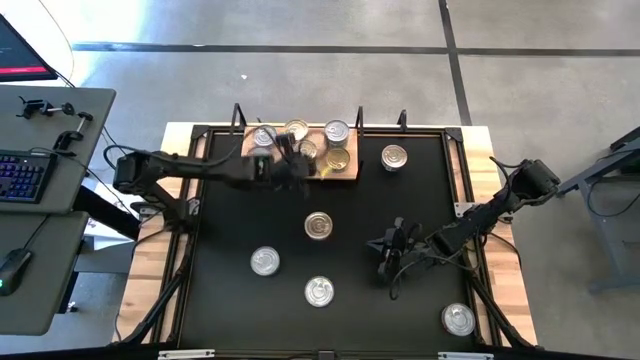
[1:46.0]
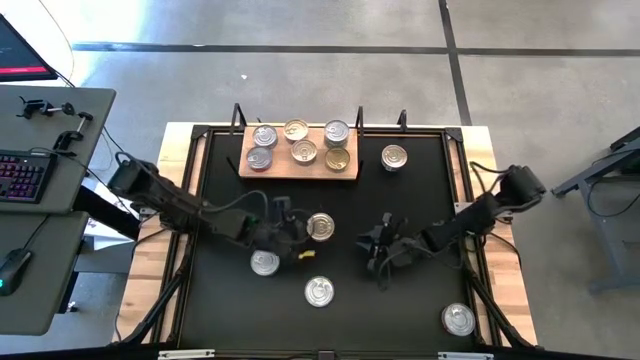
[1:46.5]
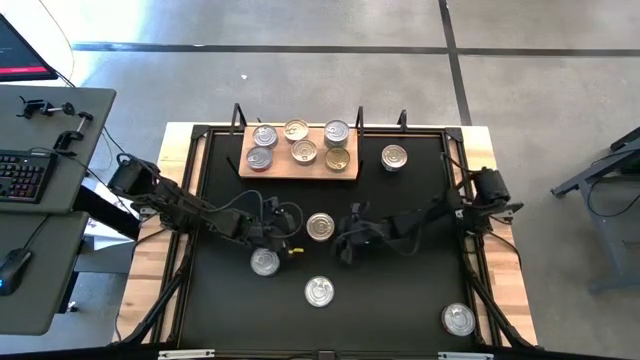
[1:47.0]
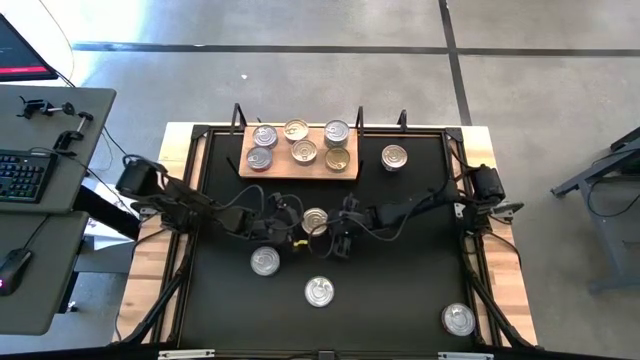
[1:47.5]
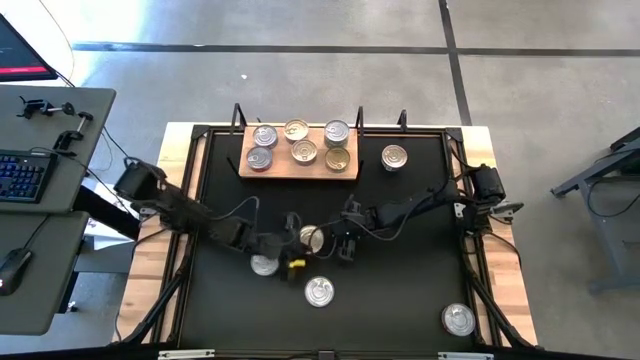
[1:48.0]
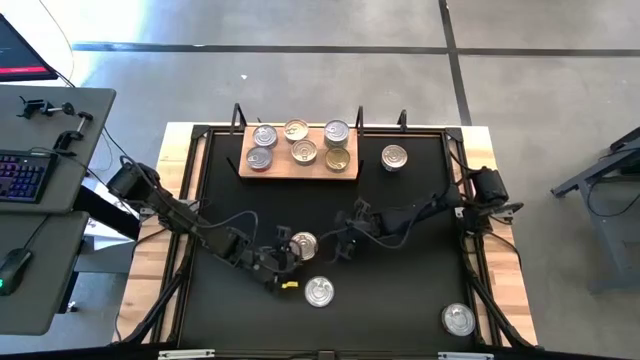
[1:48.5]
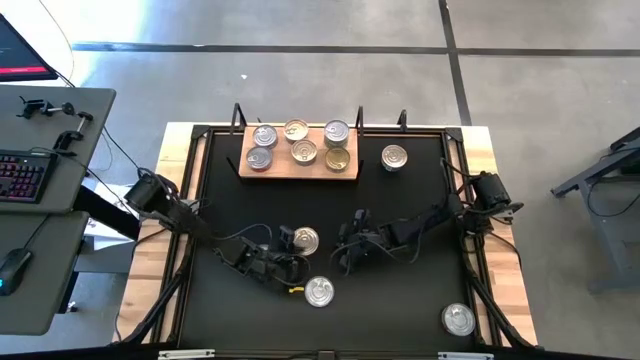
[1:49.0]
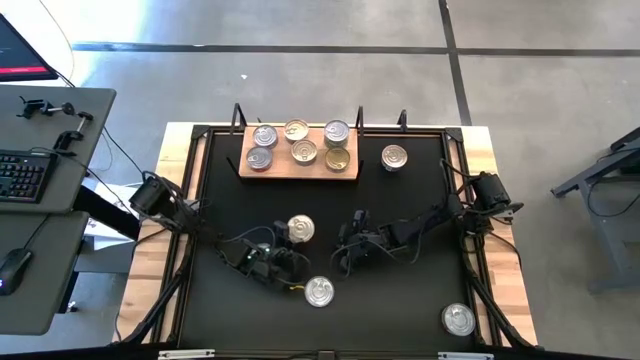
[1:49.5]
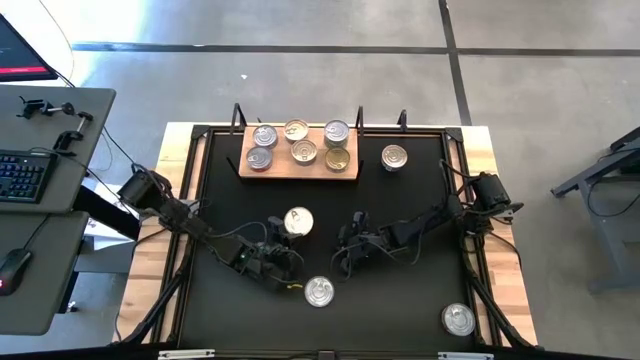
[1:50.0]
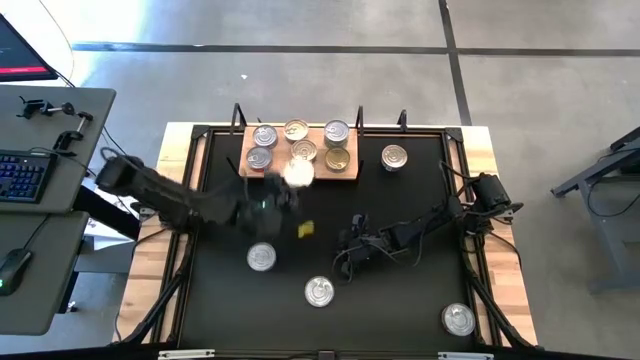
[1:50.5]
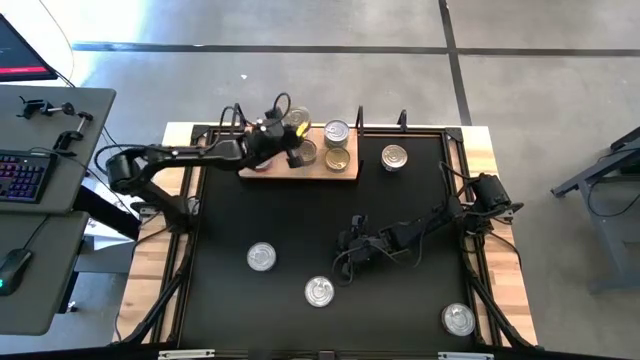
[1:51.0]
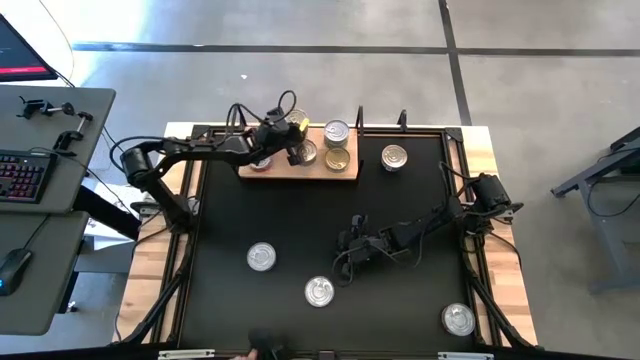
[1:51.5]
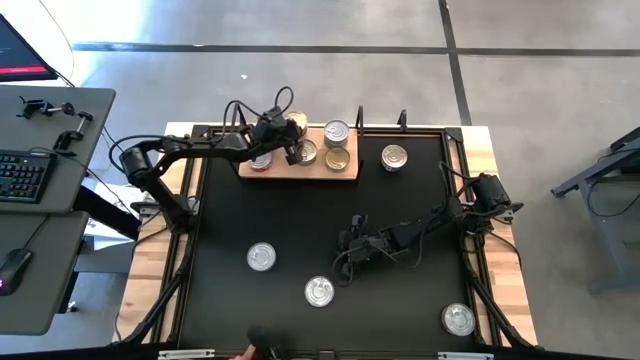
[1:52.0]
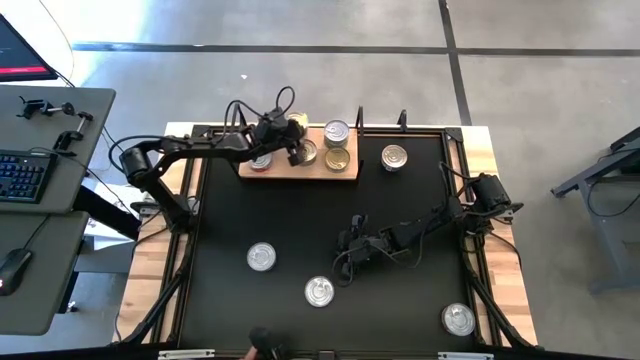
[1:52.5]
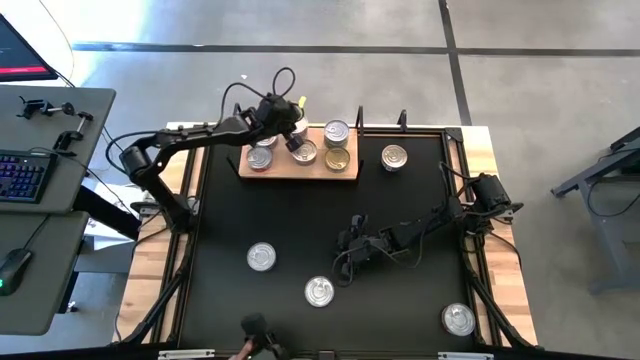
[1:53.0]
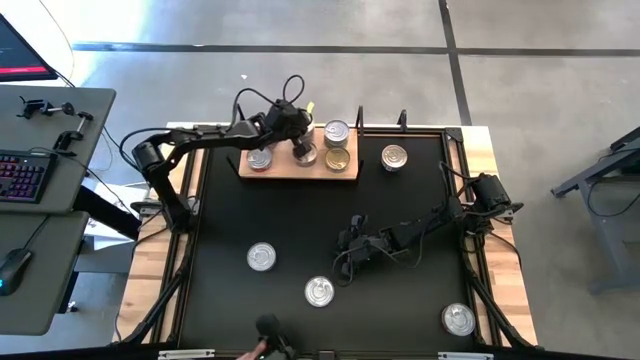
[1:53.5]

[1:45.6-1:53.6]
Task: Stack canned seafood by type on shelf
Stack the blue and pink tuna can on top of the blue and pink tuna can on the shelf

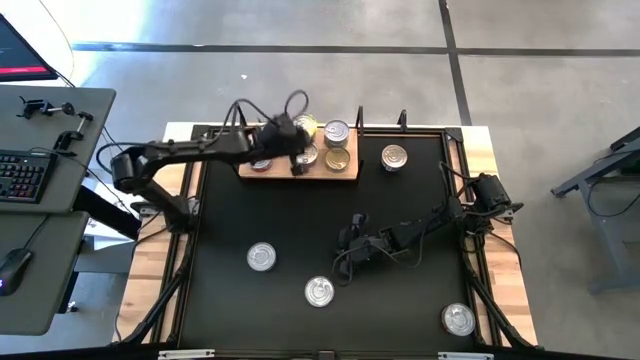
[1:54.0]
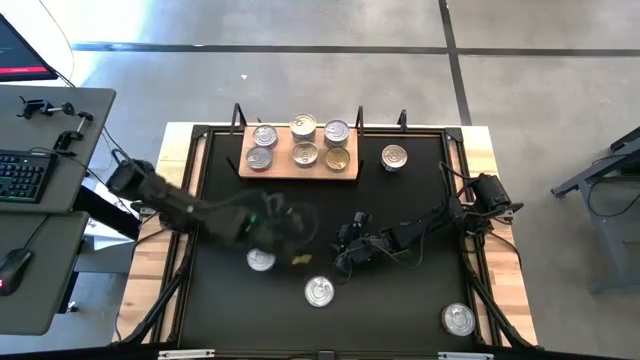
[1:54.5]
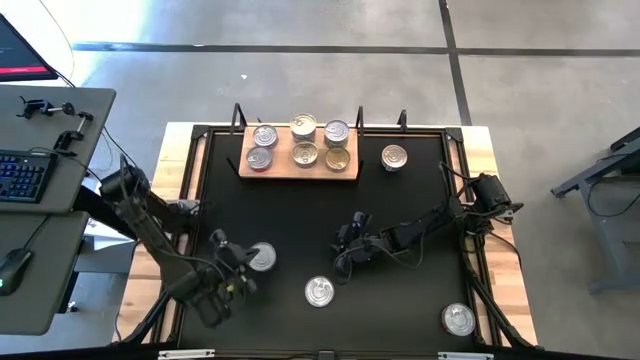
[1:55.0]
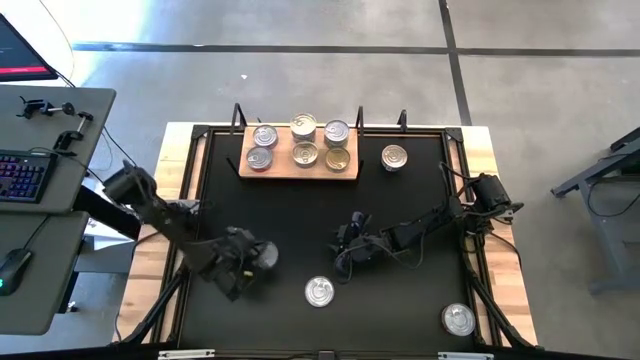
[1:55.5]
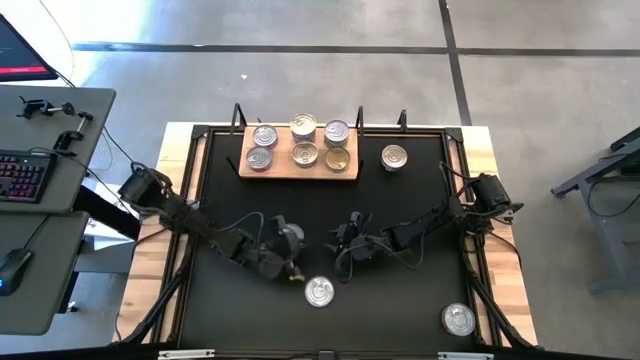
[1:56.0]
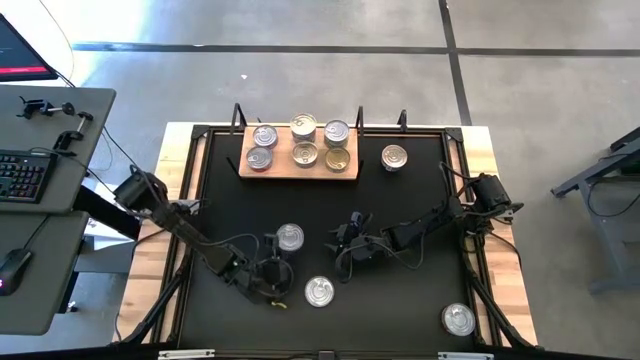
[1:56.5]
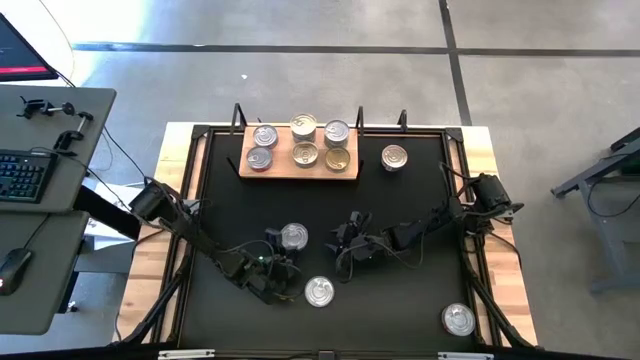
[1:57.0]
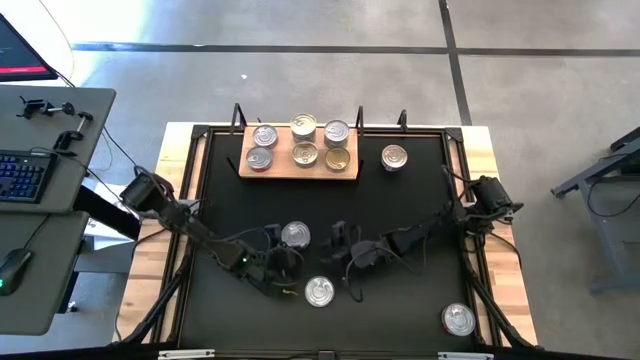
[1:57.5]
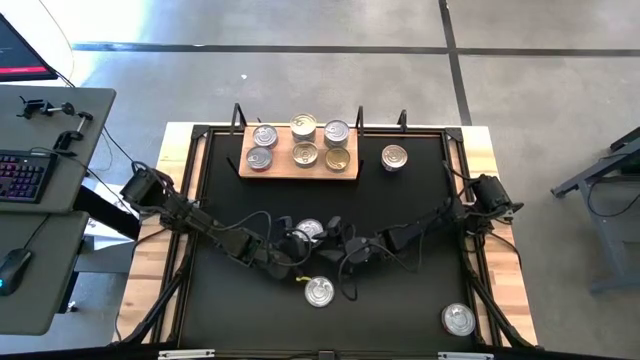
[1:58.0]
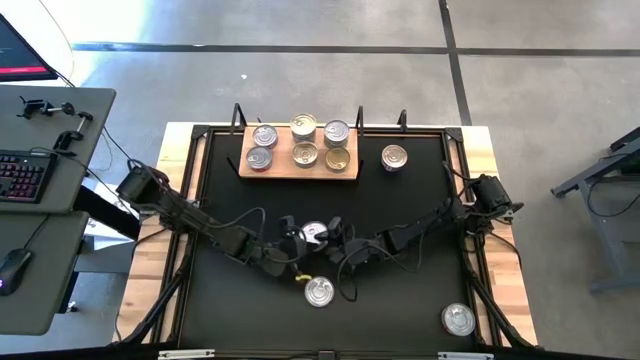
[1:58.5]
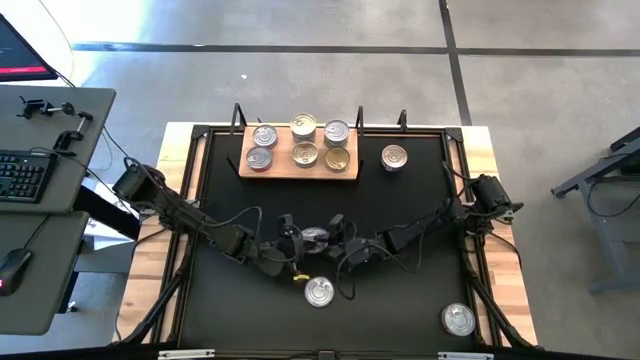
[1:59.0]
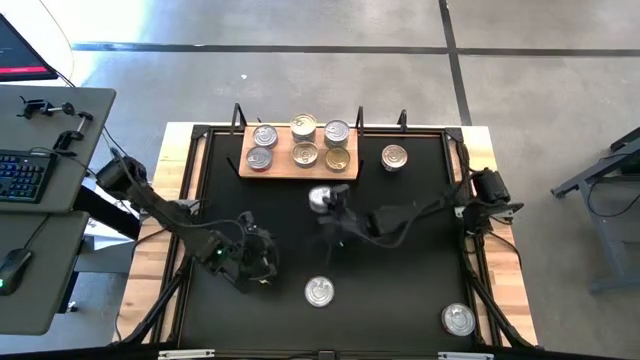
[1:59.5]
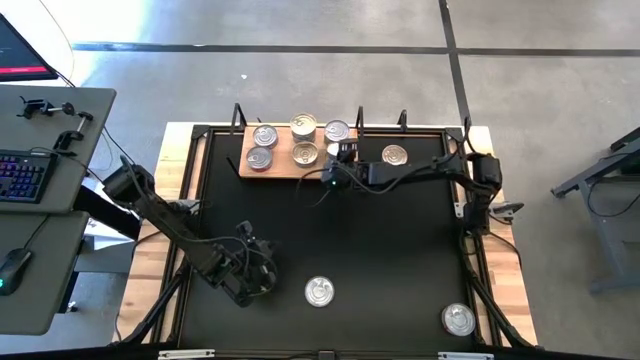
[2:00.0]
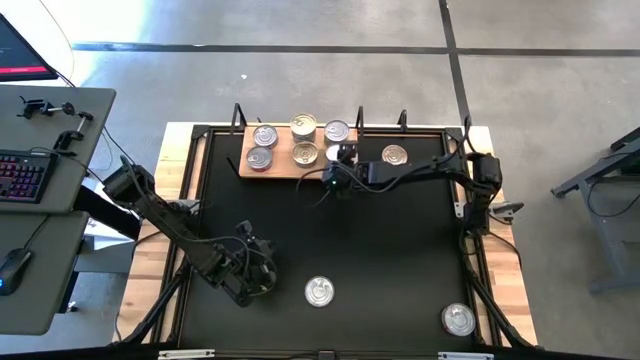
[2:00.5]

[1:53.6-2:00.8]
Stack the green tuna can on top of the green tuna can on the shelf

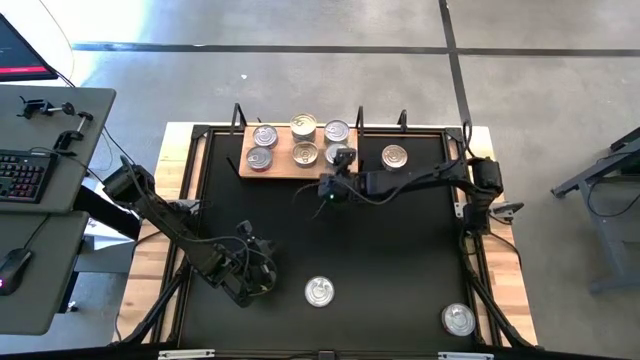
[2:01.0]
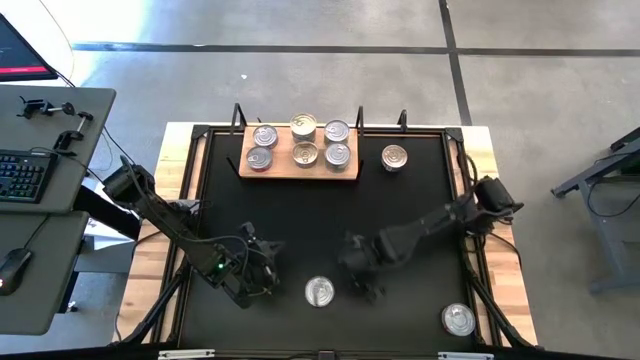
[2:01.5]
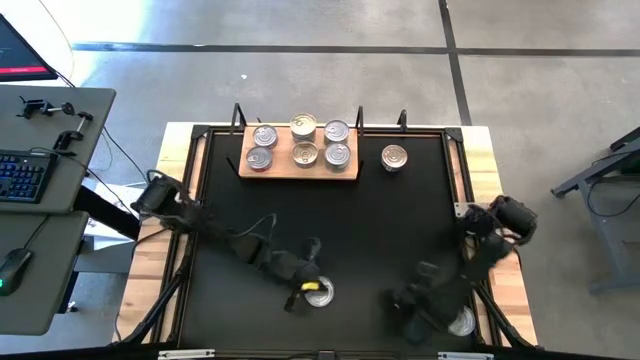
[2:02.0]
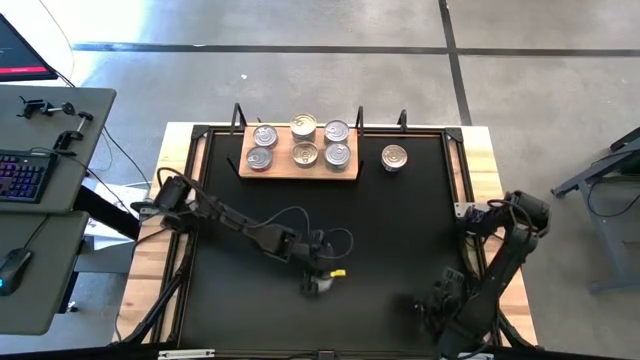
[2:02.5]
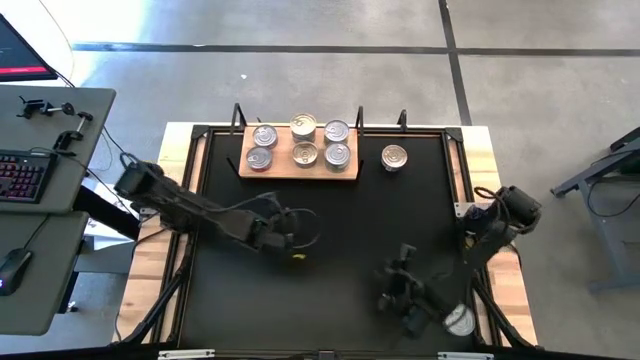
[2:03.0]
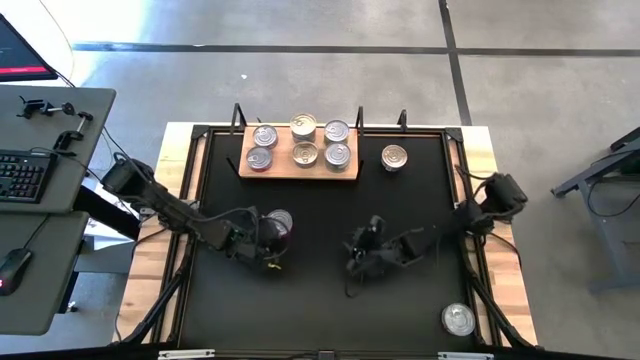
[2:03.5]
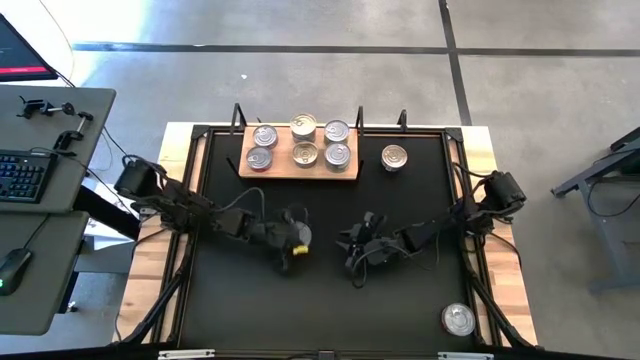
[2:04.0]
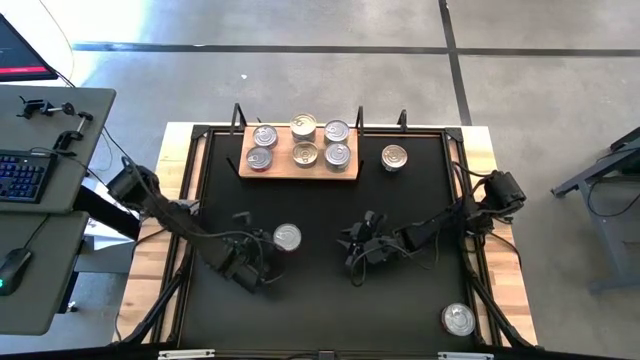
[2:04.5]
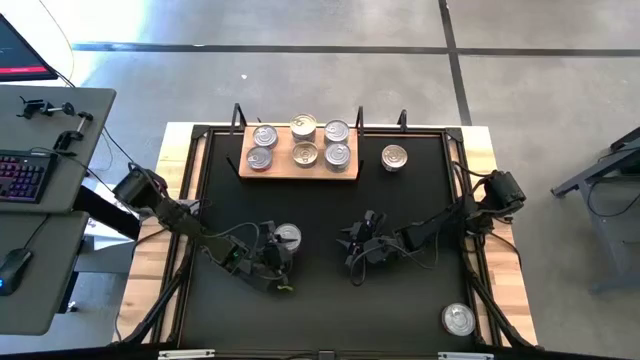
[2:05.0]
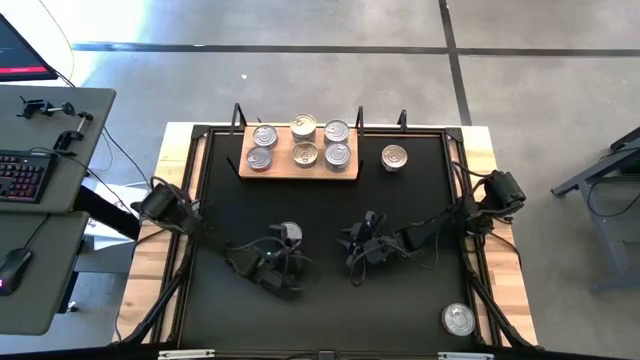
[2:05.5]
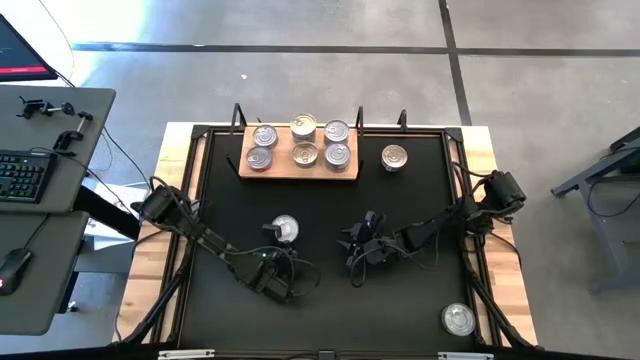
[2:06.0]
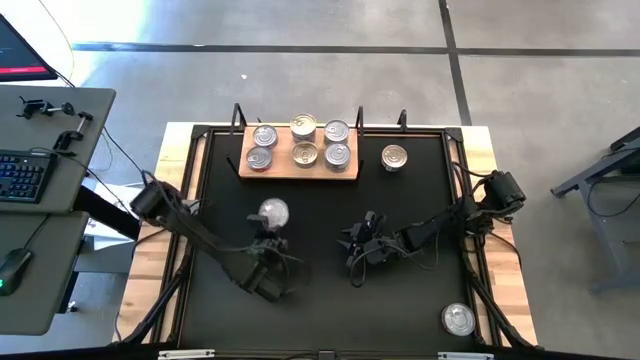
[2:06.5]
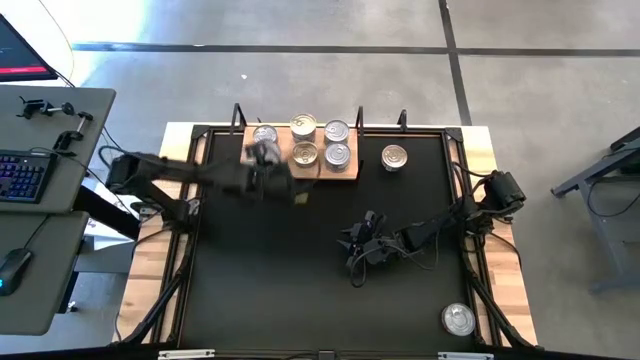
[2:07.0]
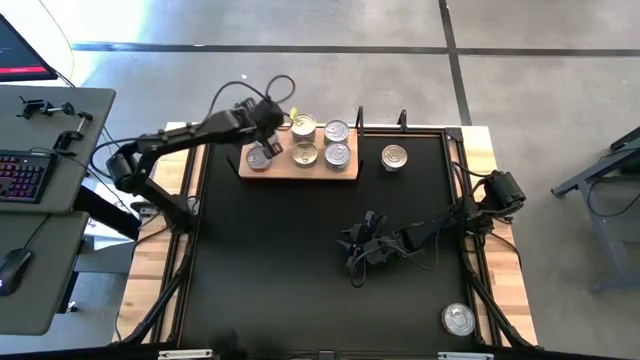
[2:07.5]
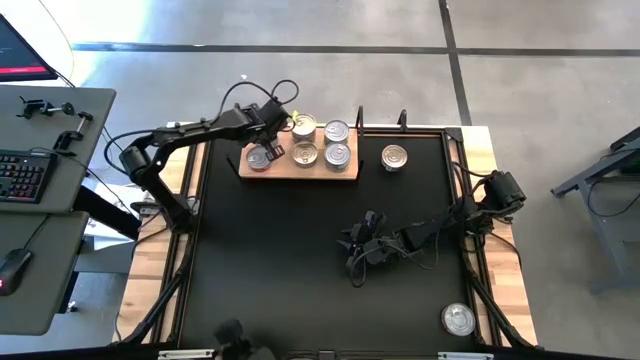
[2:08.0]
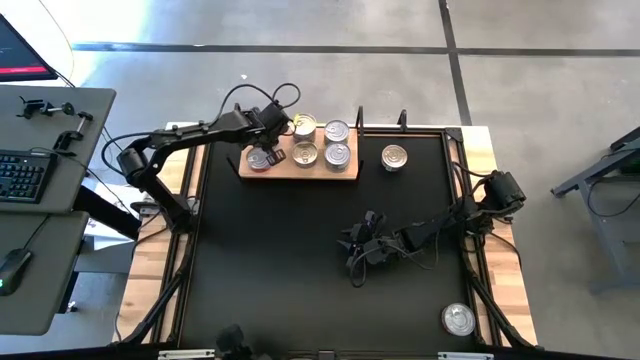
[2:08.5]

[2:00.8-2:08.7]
Stack the red tuna can on top of the red tuna can on the shelf
